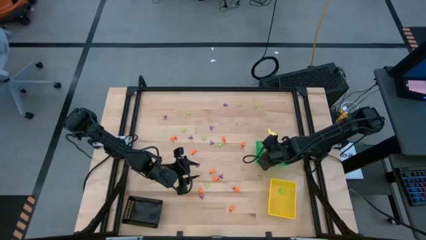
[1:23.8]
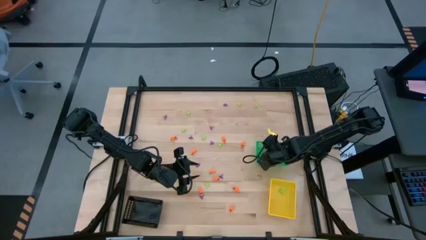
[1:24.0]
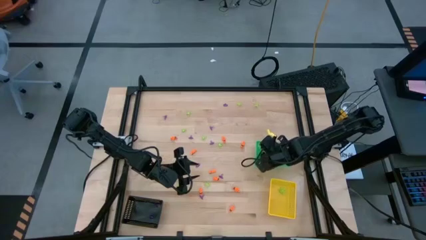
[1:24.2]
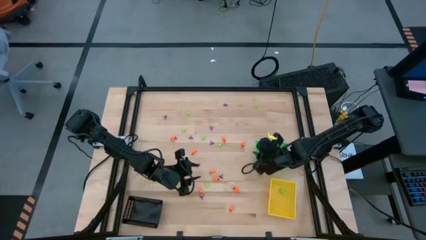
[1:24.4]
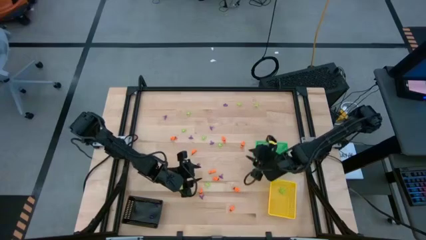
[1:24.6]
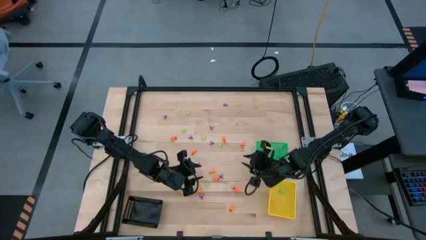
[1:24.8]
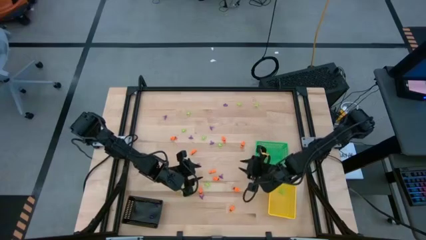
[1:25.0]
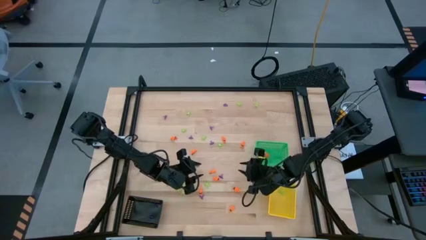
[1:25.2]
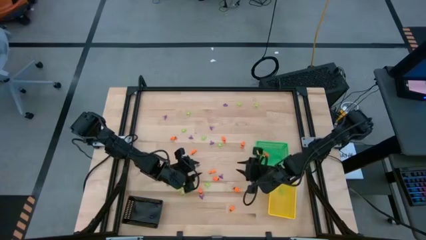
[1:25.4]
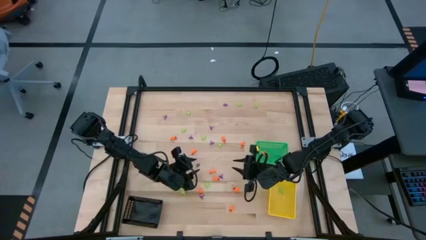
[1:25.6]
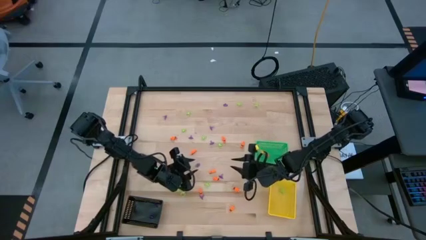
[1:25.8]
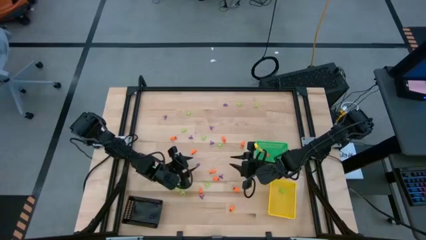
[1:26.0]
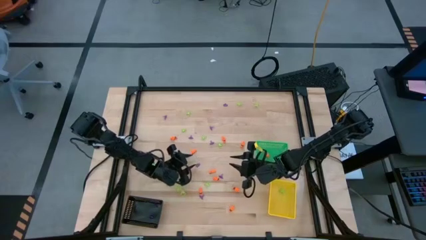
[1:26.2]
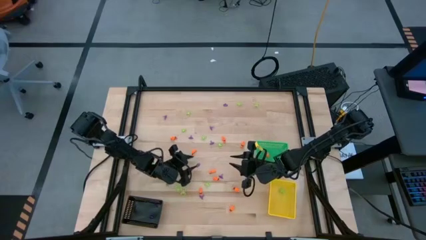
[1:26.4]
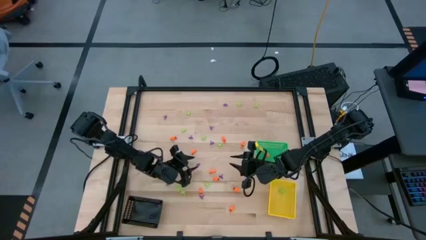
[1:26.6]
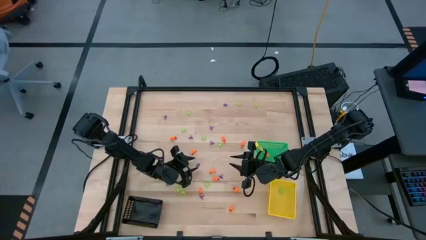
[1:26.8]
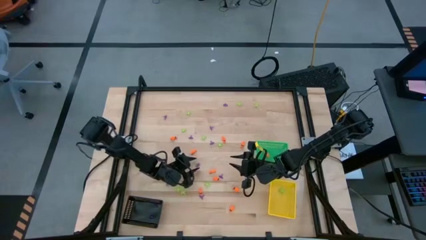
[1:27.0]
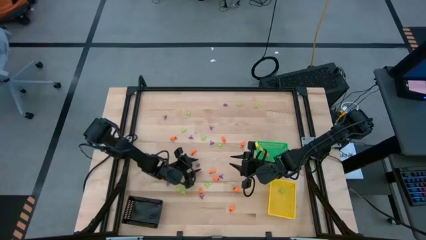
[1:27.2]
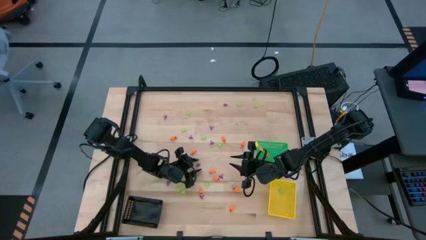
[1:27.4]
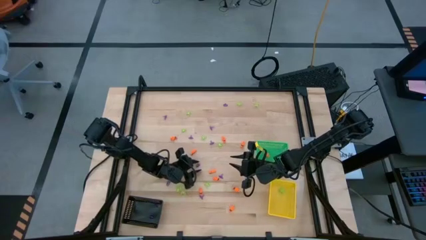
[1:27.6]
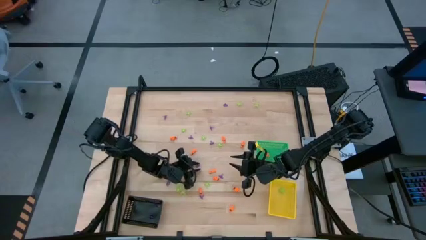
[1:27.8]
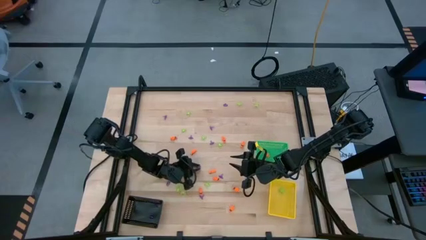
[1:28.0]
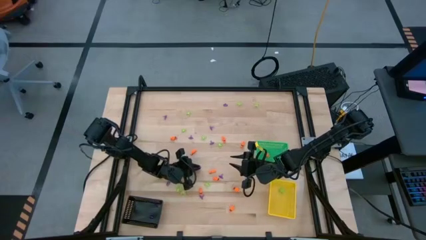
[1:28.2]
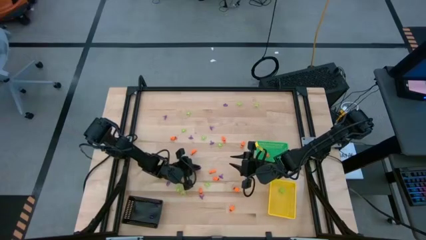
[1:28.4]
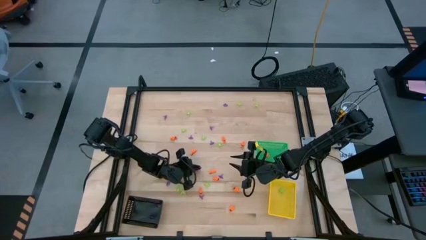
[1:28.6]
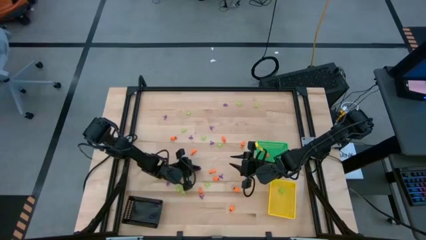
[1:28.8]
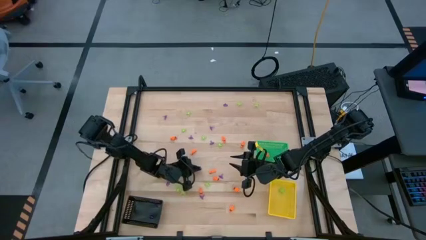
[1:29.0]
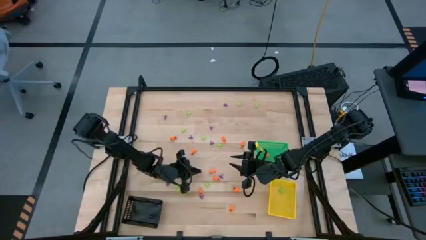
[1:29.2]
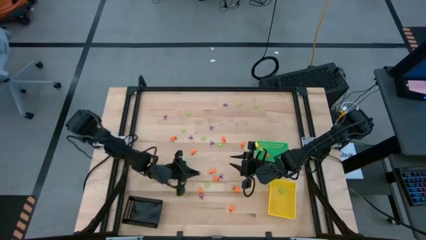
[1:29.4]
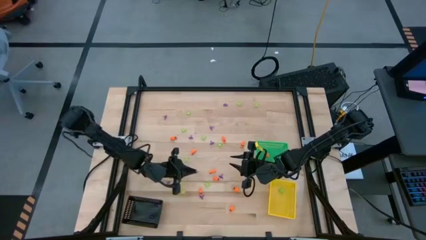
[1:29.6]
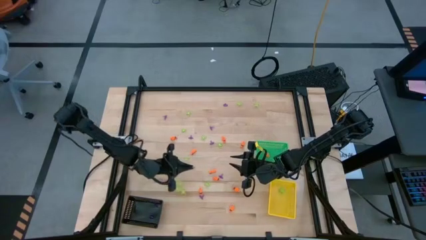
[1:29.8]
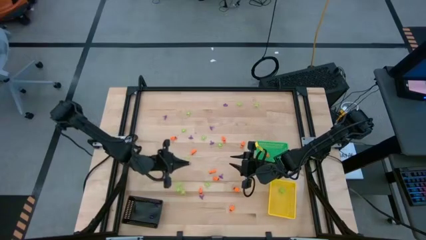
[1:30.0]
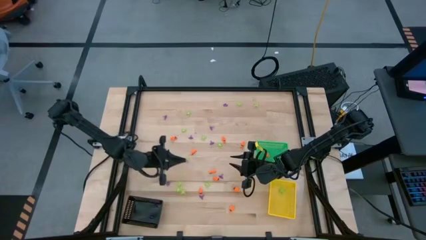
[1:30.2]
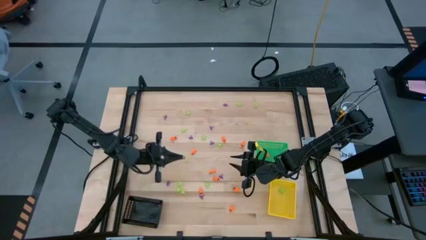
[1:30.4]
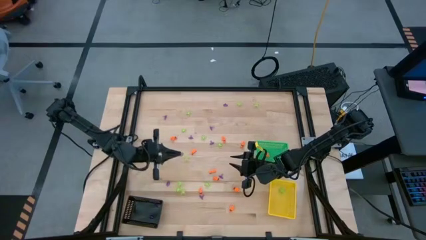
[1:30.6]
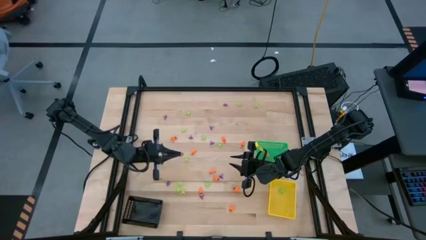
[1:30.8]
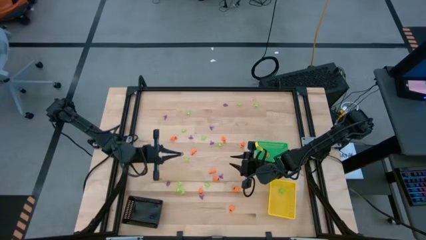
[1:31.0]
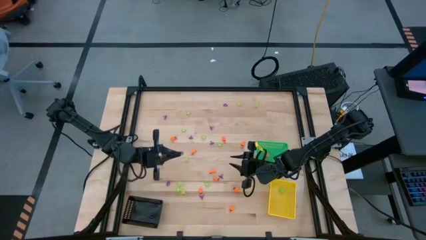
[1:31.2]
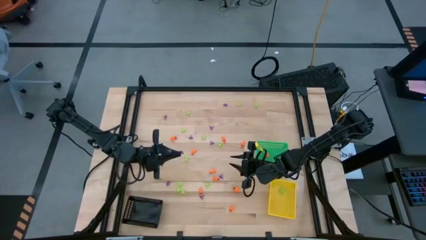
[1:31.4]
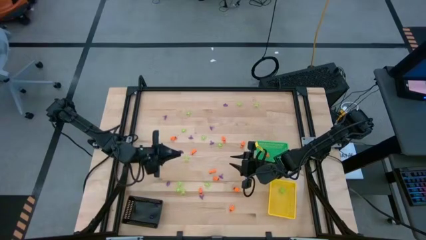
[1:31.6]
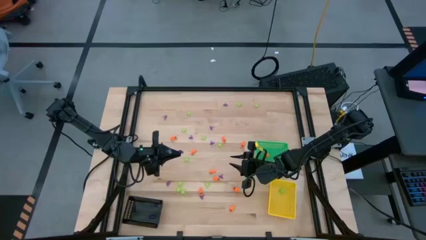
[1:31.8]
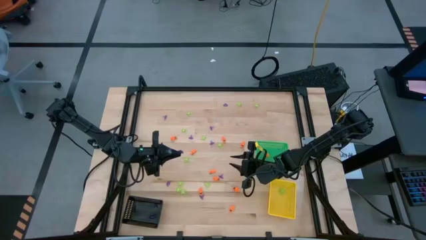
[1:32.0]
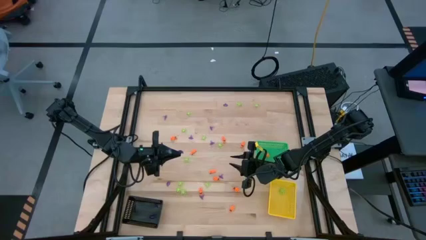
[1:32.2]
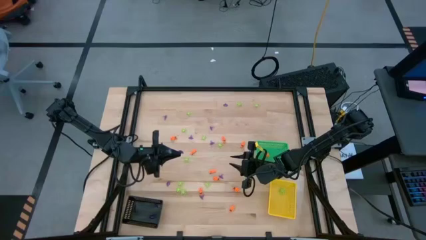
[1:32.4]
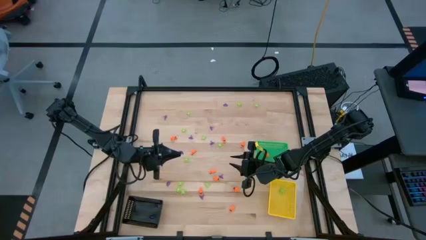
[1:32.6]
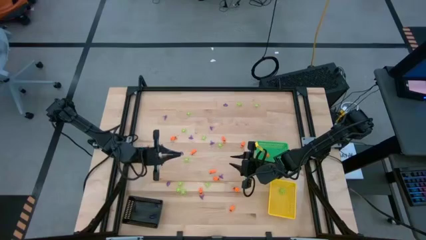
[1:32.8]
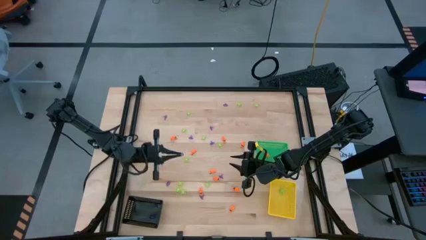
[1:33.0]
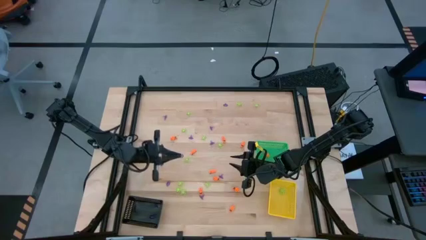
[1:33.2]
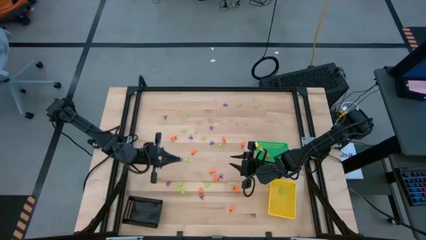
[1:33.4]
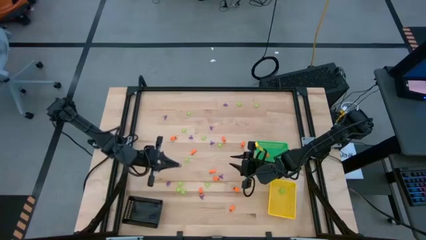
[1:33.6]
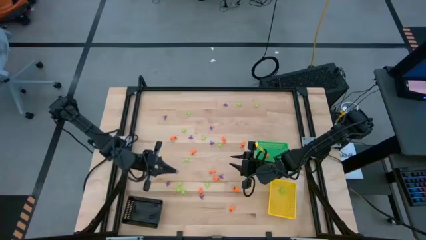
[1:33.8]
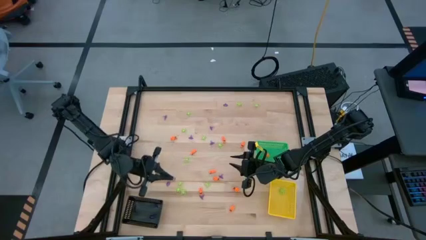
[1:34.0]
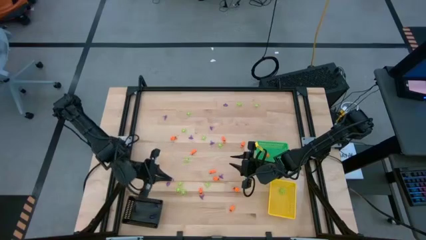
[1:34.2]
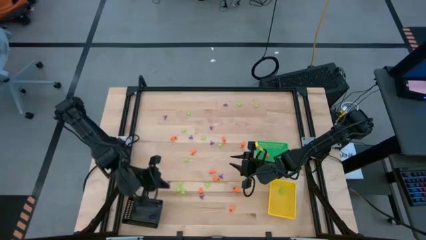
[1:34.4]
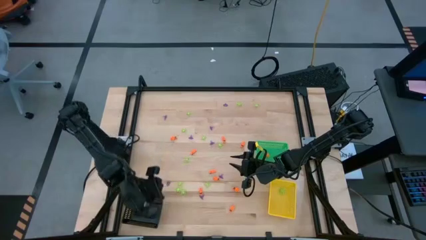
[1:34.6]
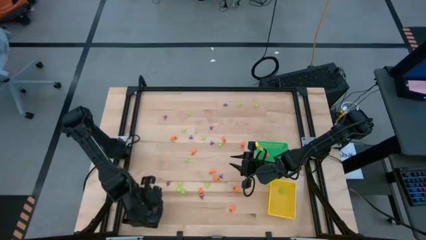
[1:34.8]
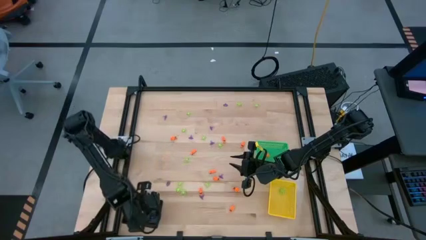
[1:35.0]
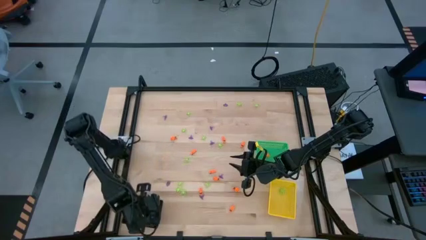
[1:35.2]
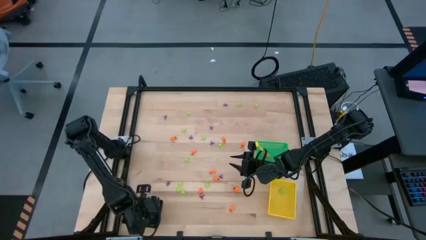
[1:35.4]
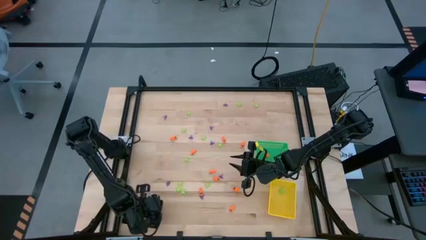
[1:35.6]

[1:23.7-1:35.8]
Task: Sort Halloween decoration
Put the purple witch hat toy into the black bin
